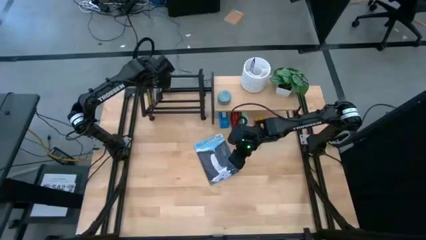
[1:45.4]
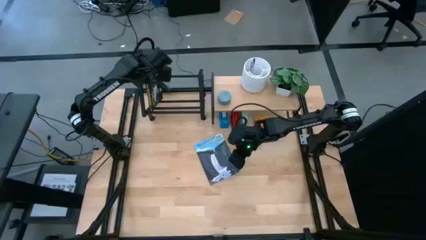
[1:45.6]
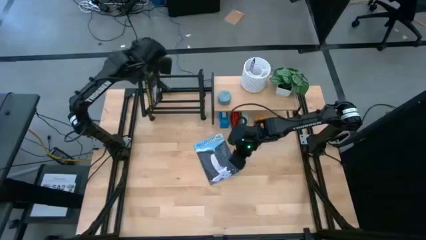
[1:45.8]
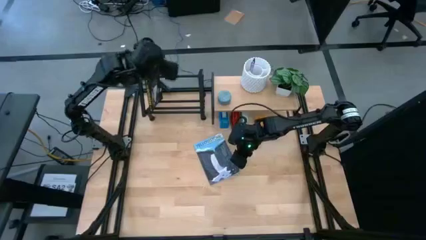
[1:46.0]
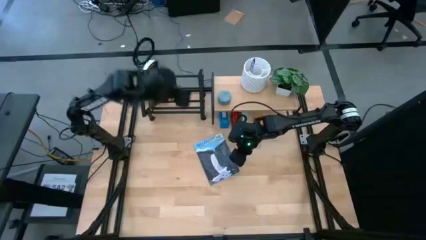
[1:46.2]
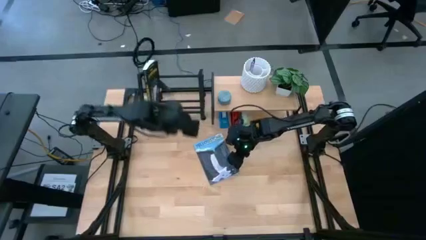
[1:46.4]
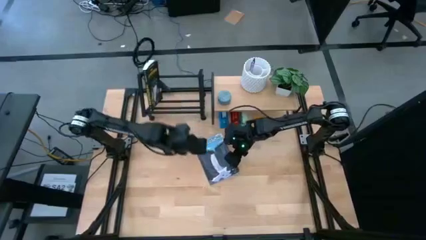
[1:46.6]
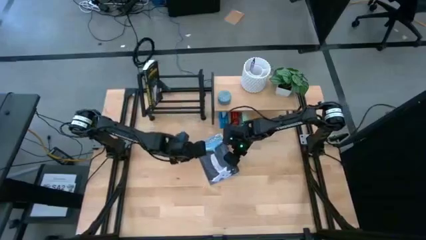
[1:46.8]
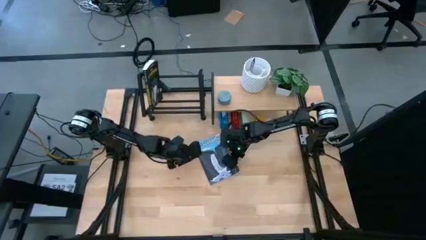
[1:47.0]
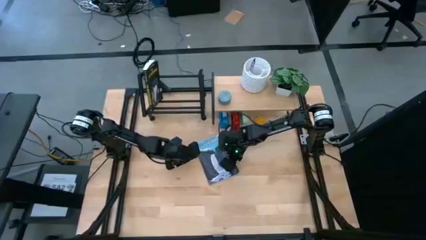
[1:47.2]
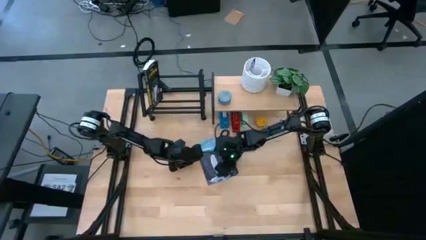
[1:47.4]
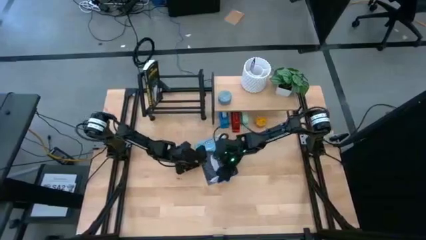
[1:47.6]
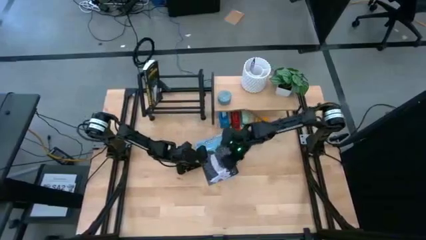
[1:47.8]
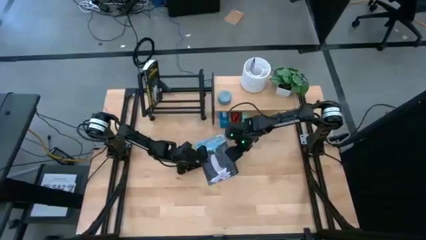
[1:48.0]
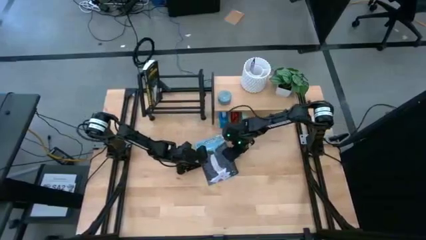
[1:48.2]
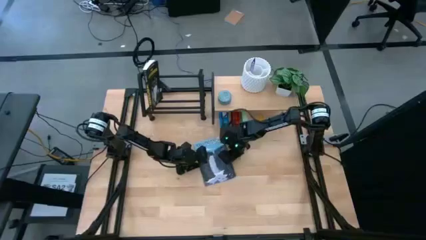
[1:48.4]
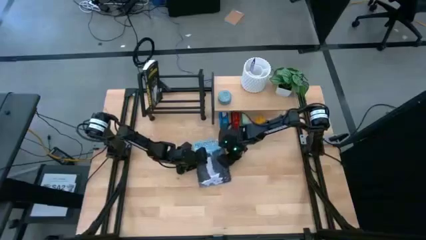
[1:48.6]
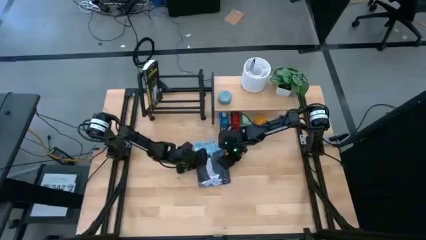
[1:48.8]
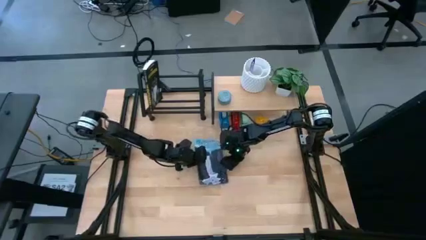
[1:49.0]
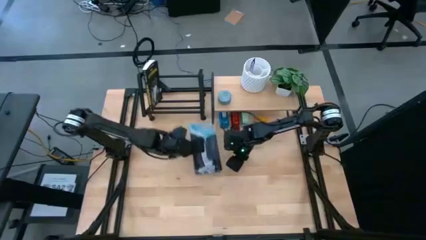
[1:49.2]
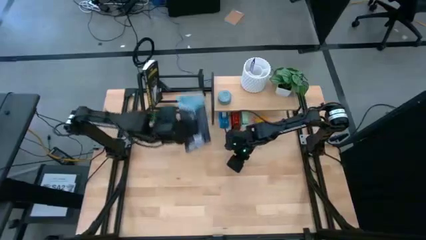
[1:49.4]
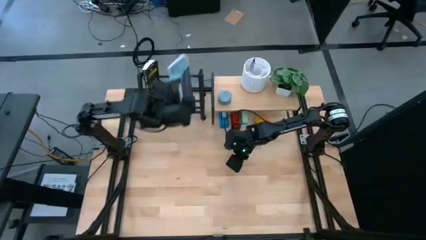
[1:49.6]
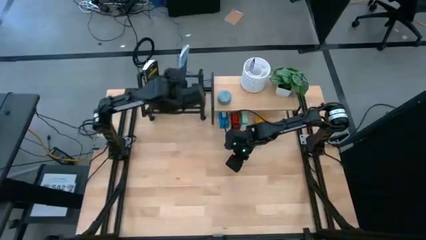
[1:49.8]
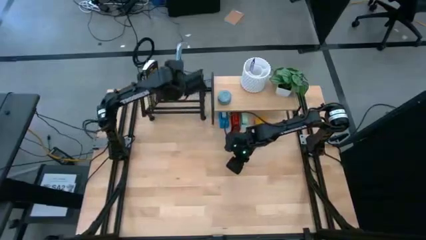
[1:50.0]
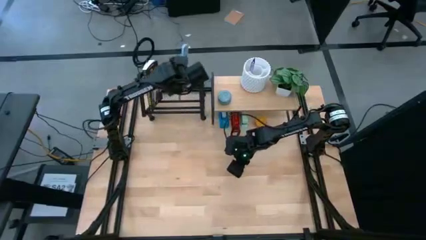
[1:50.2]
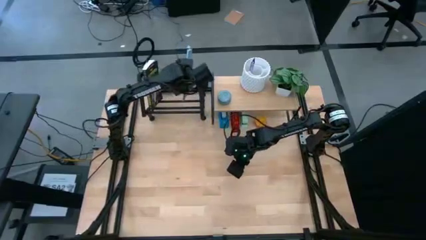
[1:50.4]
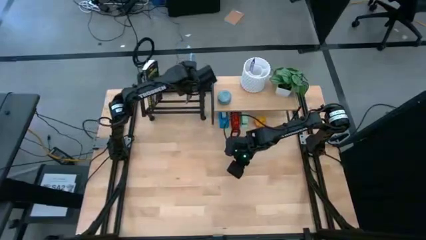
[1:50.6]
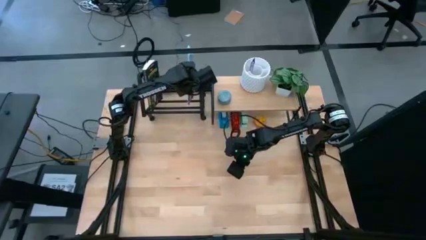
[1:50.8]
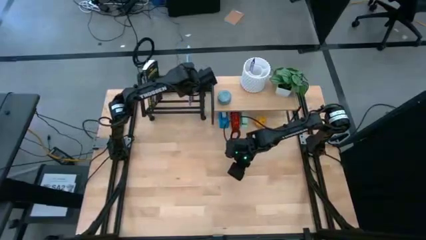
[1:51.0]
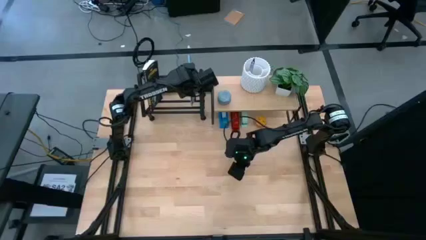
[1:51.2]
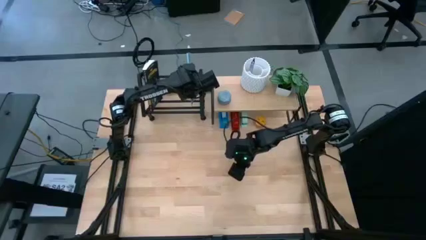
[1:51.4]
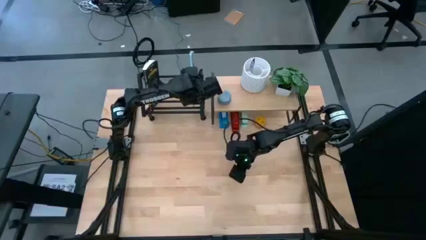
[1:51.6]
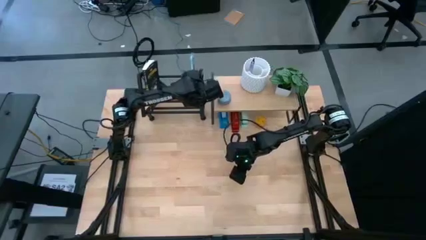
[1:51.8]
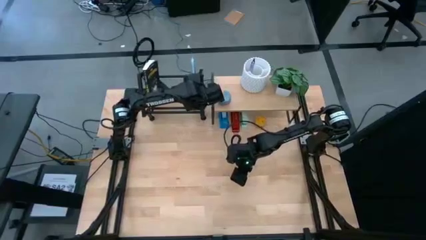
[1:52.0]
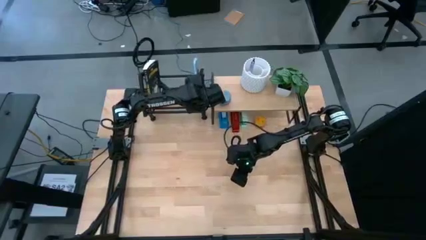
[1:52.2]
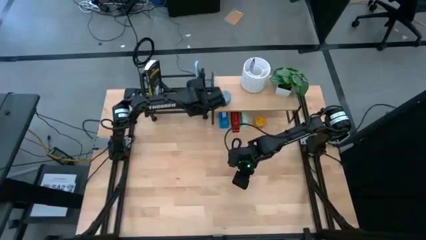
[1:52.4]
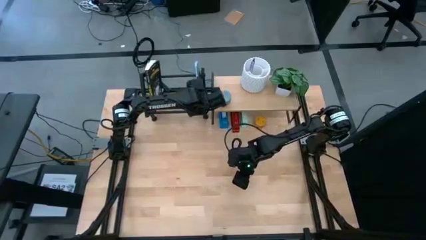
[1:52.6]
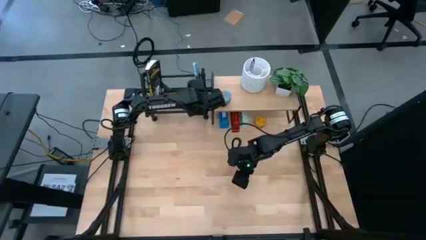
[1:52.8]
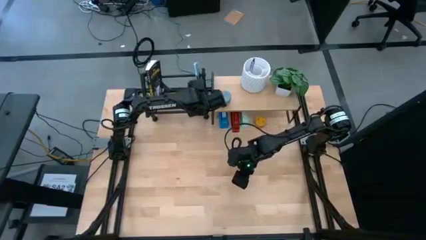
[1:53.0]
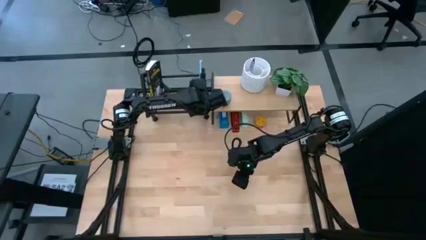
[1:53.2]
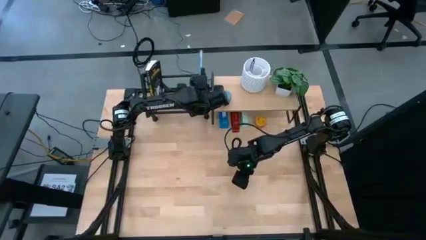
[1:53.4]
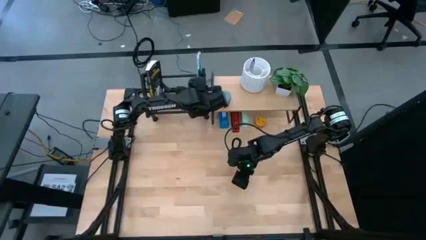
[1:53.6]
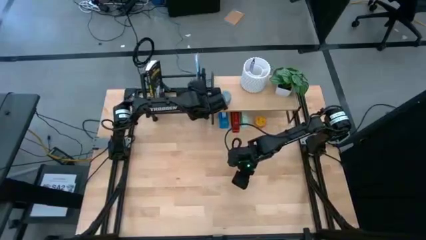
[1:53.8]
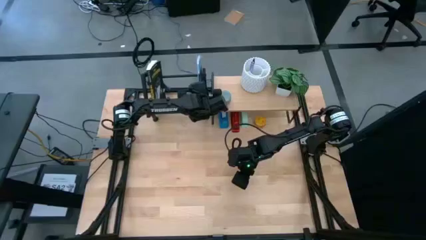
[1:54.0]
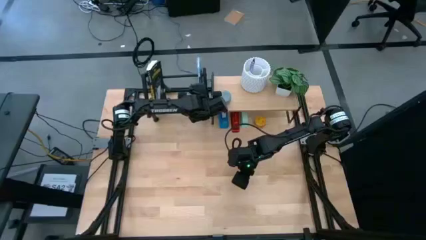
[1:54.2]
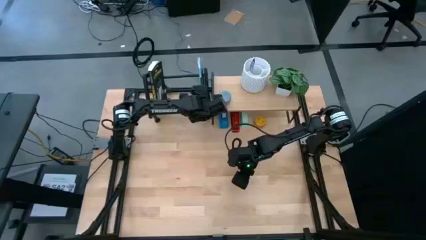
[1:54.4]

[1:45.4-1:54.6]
Task: Stock shelves
Put the blue book into the black book shelf

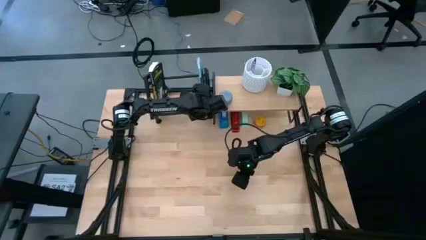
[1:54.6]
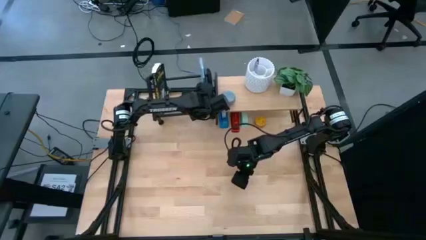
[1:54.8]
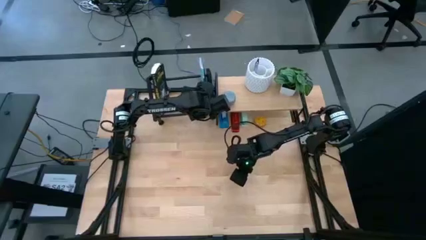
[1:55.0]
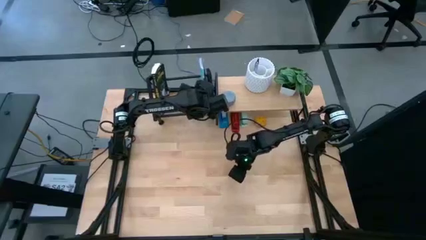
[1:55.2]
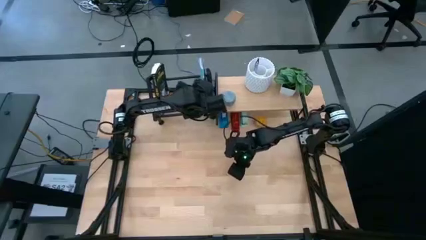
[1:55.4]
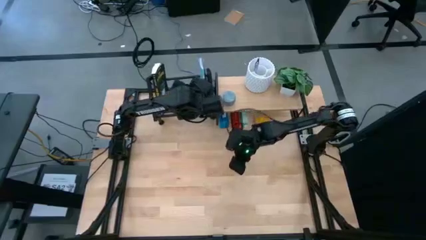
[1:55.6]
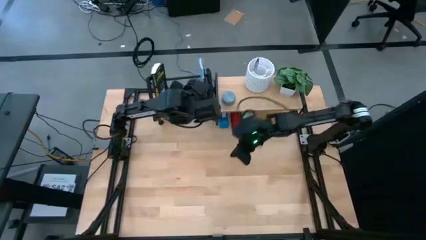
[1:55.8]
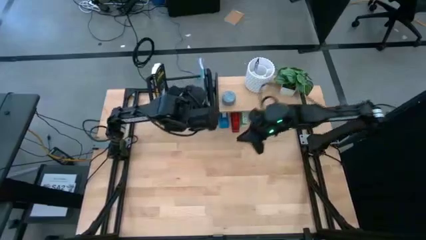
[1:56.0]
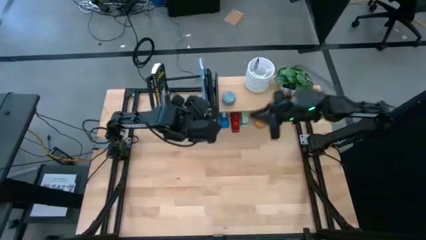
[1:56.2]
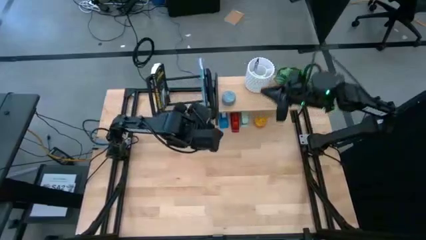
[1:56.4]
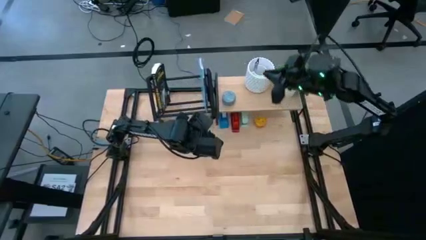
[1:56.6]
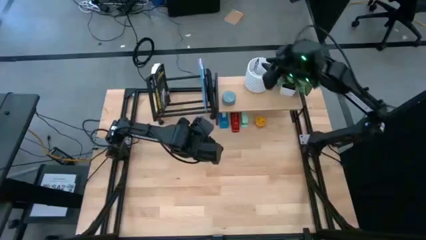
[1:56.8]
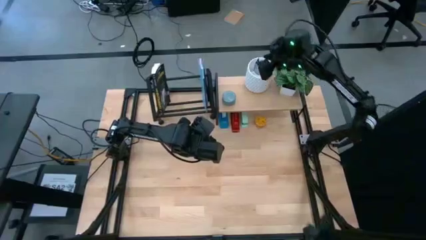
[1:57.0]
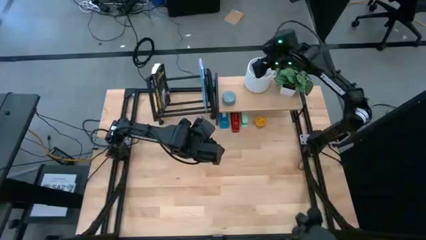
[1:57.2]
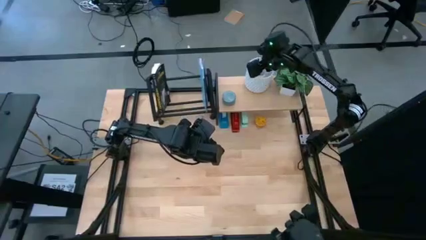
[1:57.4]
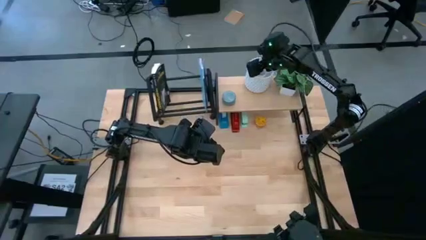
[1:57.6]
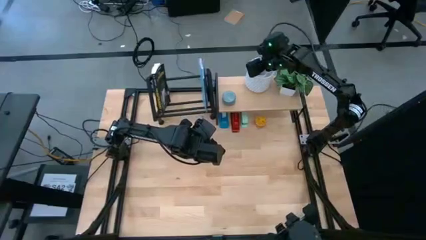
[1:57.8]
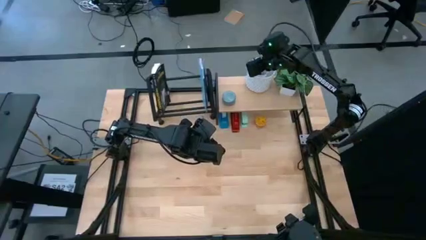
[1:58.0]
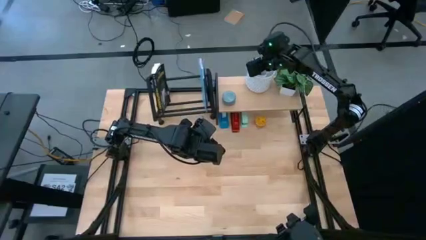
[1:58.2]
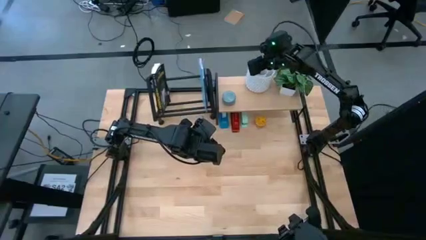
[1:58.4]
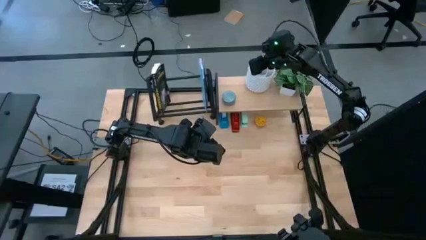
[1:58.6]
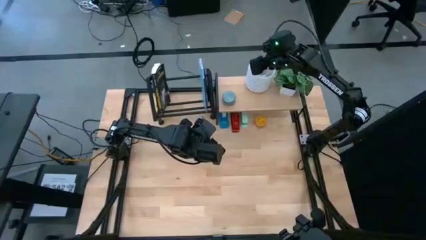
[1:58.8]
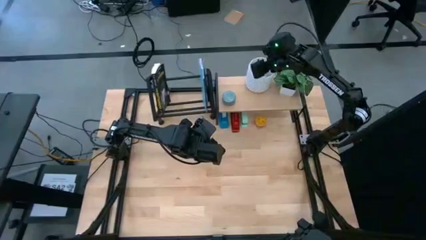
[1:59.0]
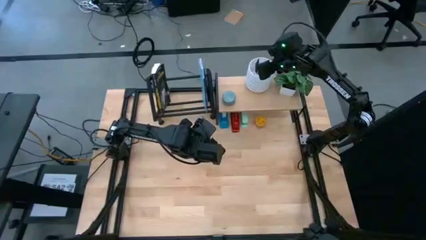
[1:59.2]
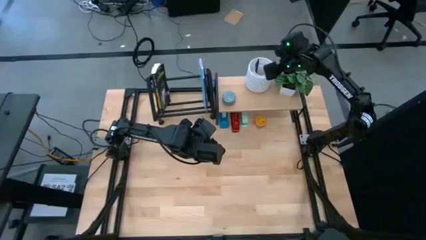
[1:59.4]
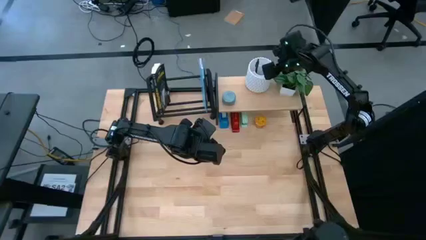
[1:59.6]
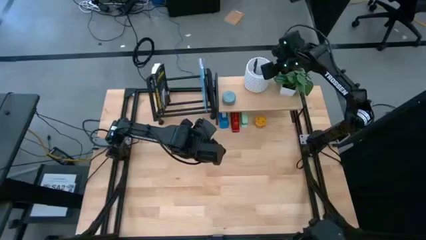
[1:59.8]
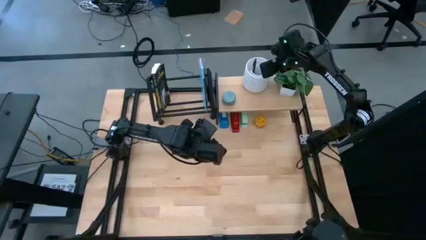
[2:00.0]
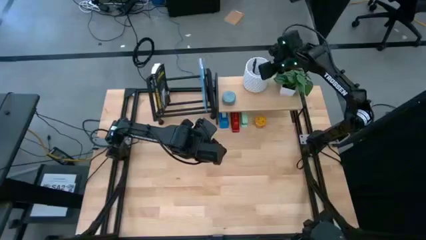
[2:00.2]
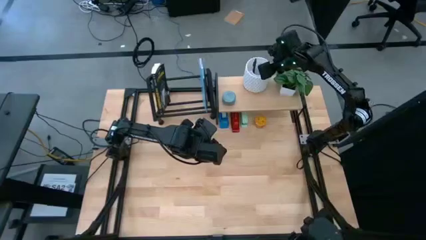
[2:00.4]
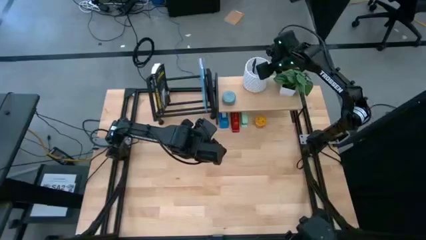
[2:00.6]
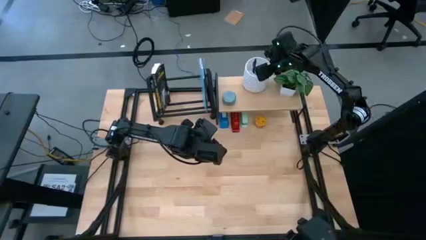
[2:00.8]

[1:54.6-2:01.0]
Remove the purple pen from the white pen holder on the shelf

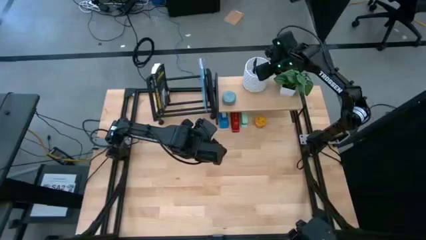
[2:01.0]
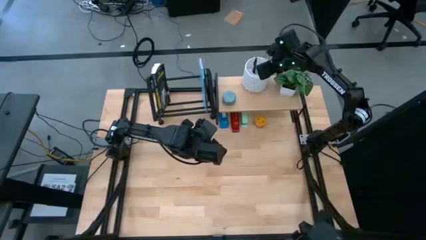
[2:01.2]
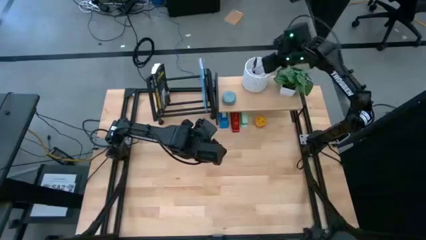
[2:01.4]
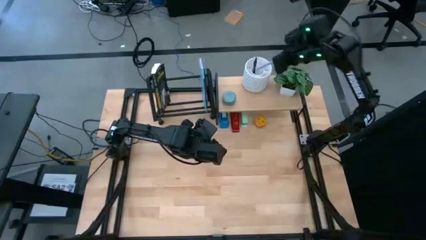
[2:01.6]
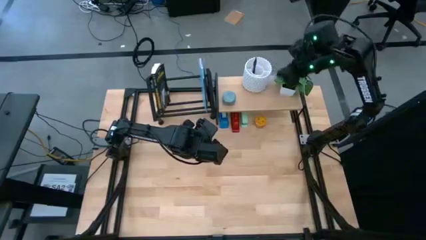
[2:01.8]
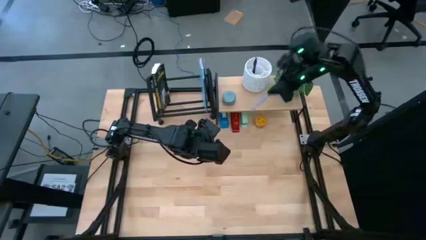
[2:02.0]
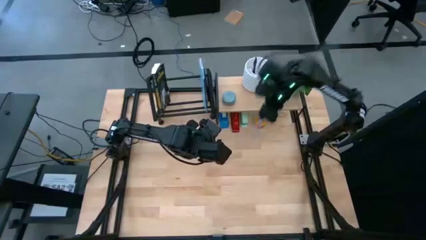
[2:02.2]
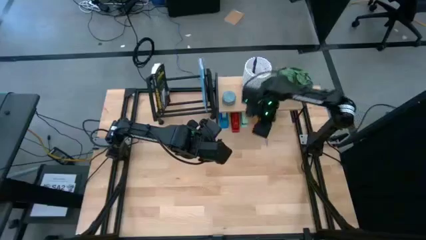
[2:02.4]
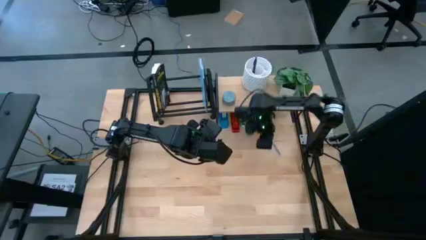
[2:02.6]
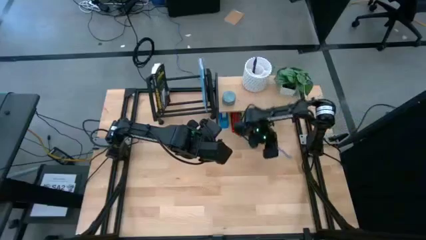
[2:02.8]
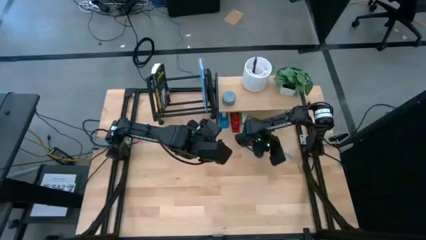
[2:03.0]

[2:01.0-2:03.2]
Remove the purple pen from the white pen holder
